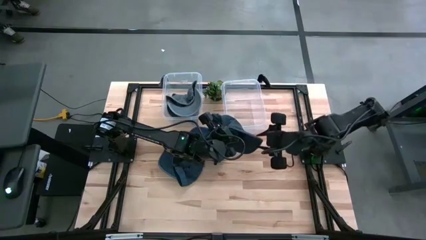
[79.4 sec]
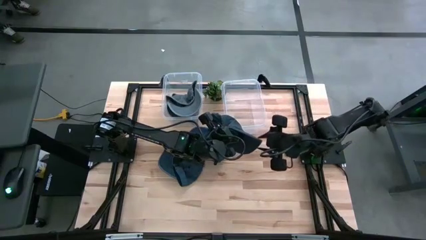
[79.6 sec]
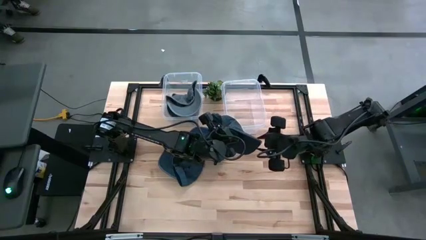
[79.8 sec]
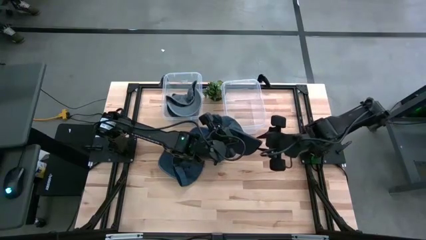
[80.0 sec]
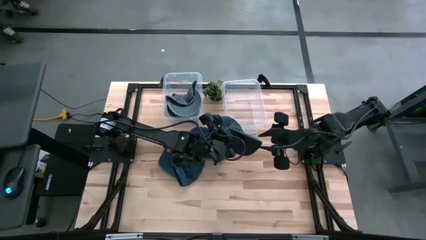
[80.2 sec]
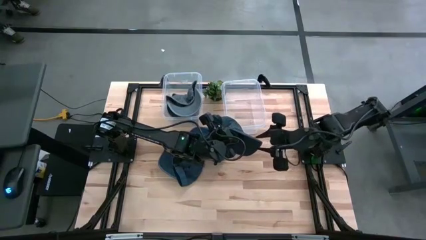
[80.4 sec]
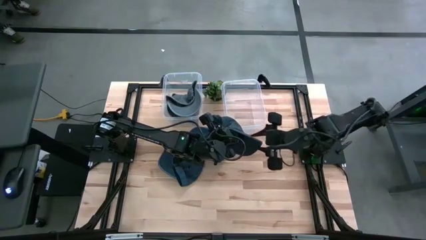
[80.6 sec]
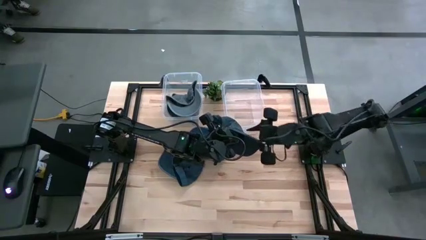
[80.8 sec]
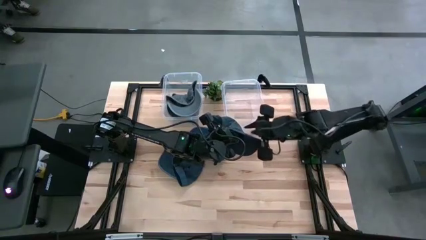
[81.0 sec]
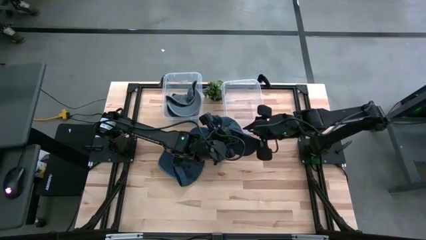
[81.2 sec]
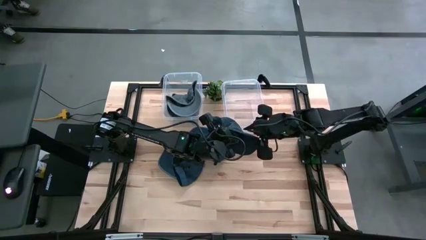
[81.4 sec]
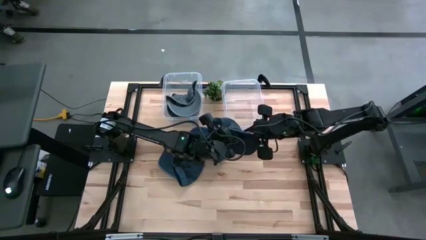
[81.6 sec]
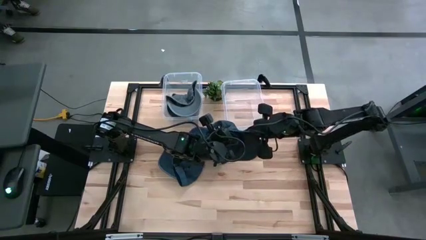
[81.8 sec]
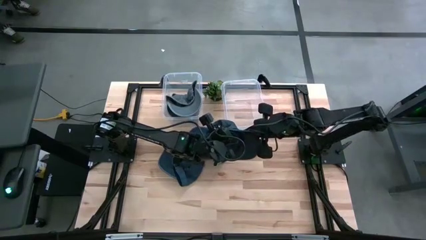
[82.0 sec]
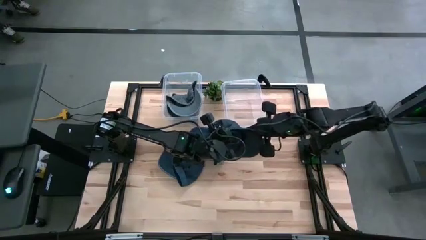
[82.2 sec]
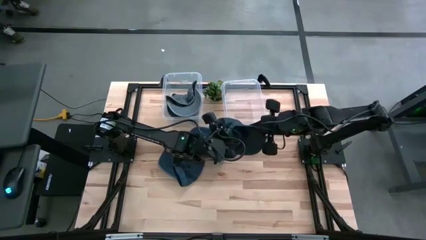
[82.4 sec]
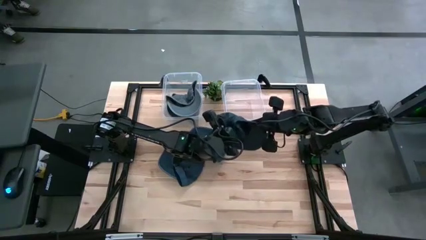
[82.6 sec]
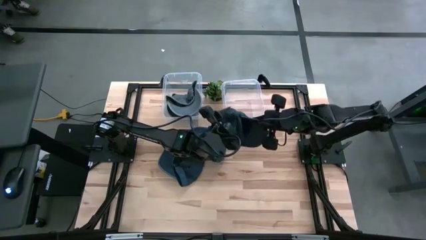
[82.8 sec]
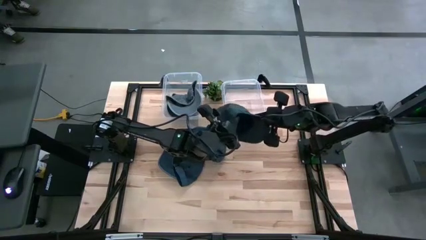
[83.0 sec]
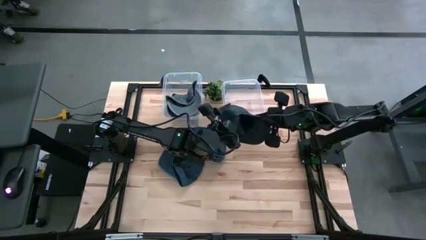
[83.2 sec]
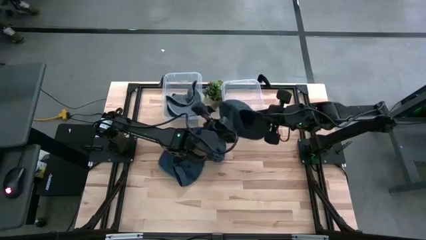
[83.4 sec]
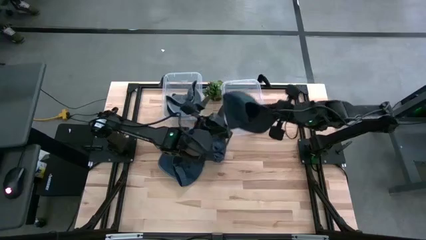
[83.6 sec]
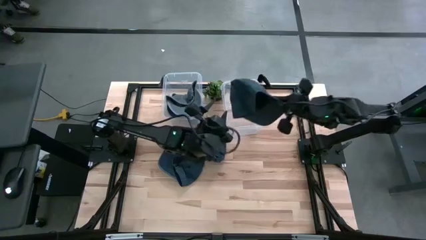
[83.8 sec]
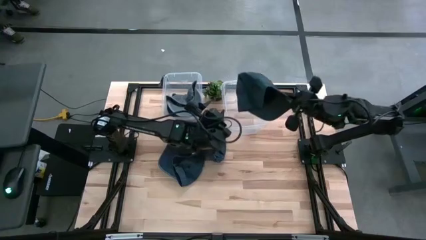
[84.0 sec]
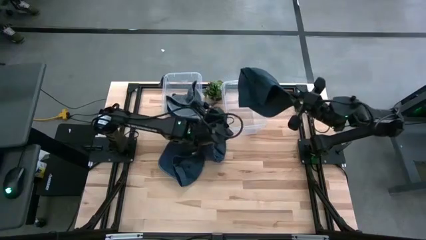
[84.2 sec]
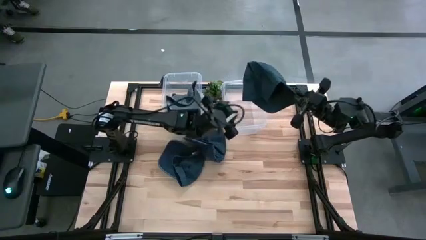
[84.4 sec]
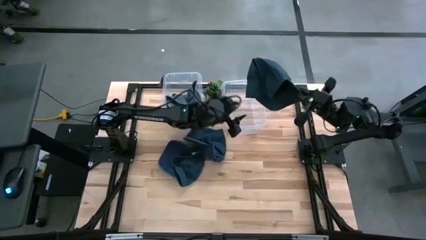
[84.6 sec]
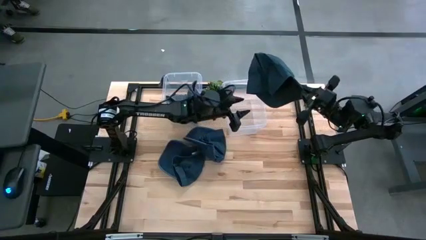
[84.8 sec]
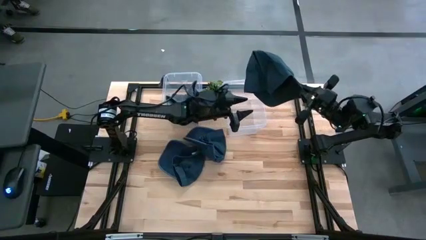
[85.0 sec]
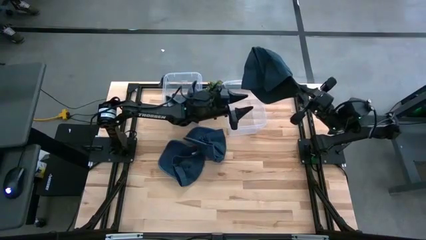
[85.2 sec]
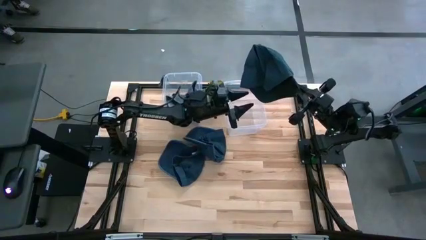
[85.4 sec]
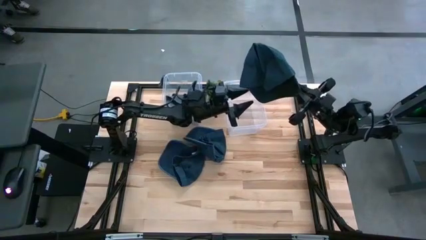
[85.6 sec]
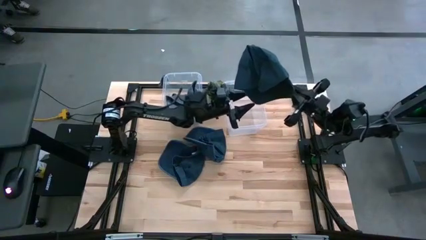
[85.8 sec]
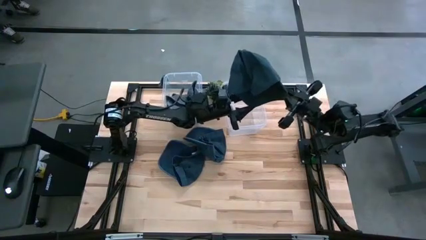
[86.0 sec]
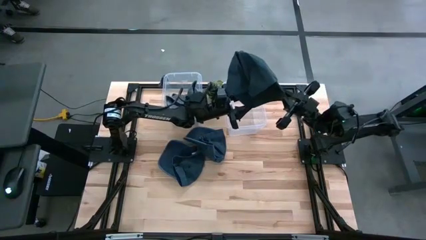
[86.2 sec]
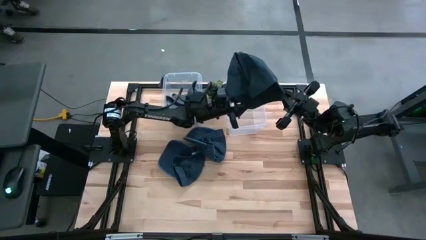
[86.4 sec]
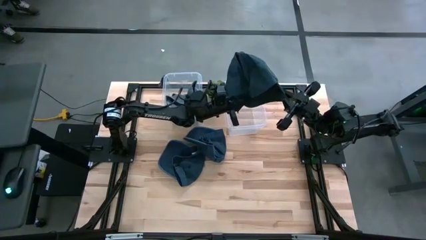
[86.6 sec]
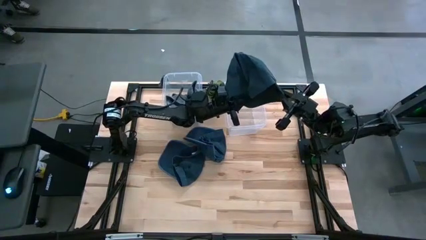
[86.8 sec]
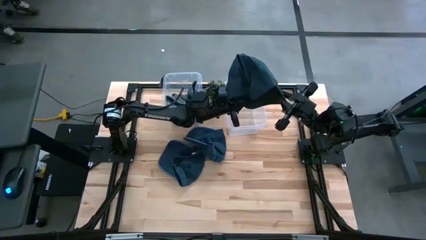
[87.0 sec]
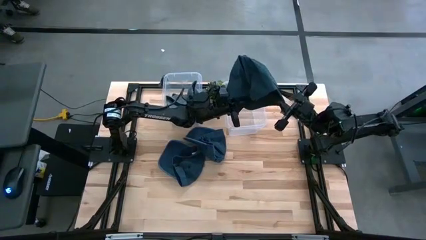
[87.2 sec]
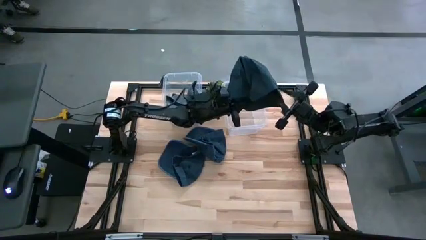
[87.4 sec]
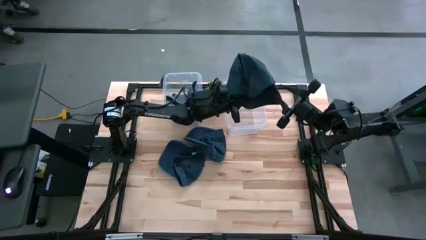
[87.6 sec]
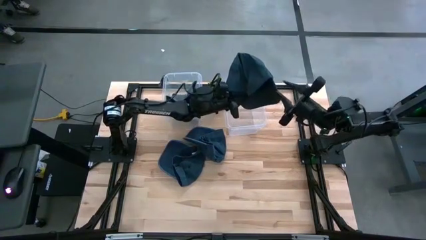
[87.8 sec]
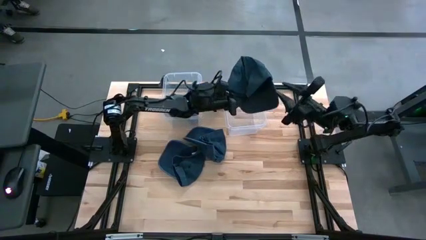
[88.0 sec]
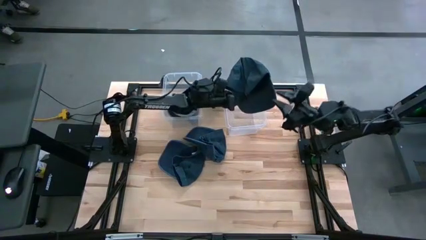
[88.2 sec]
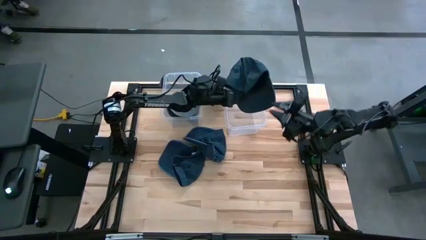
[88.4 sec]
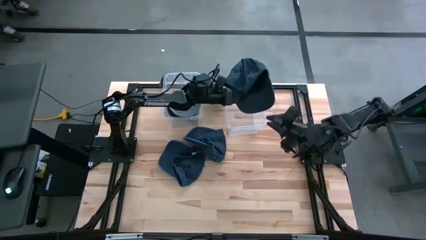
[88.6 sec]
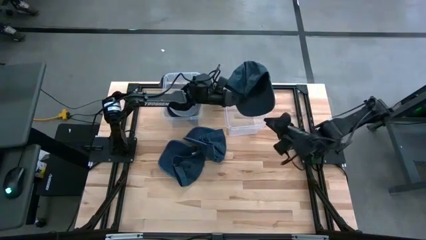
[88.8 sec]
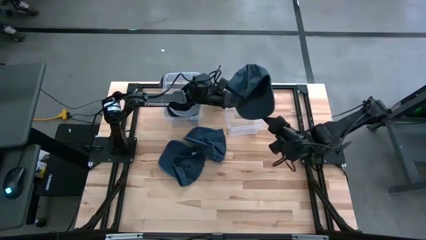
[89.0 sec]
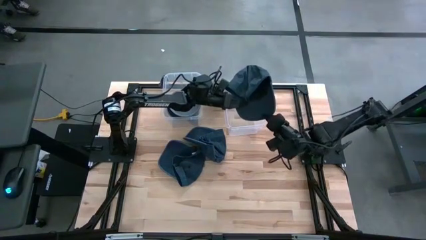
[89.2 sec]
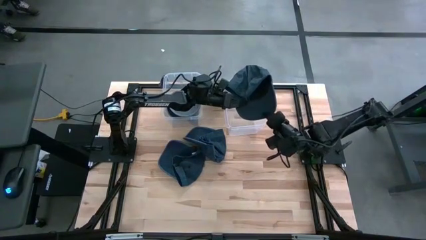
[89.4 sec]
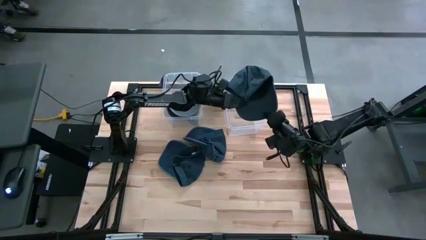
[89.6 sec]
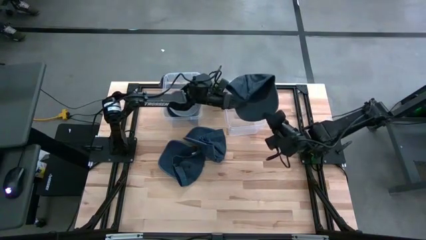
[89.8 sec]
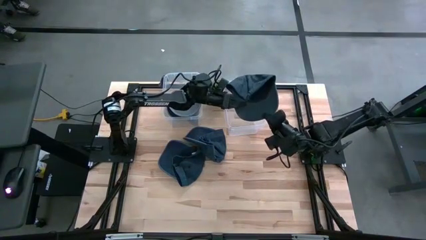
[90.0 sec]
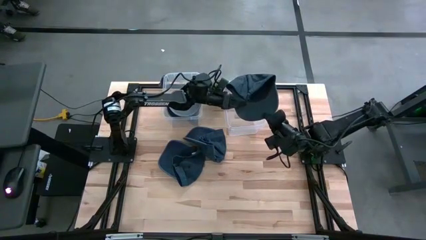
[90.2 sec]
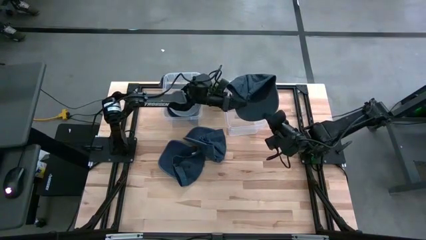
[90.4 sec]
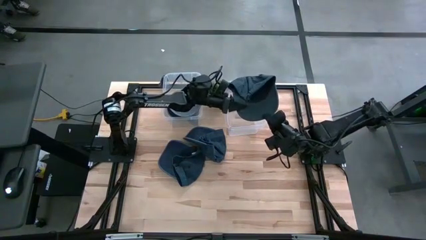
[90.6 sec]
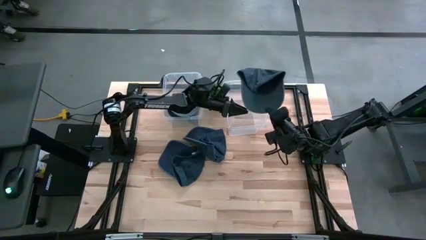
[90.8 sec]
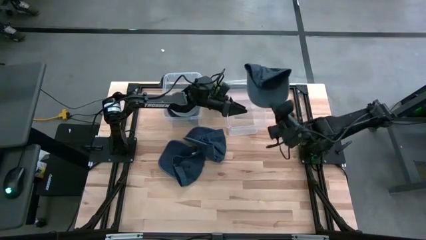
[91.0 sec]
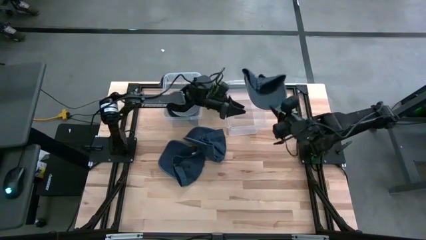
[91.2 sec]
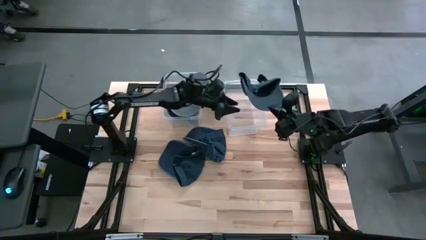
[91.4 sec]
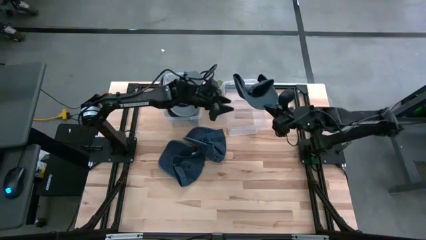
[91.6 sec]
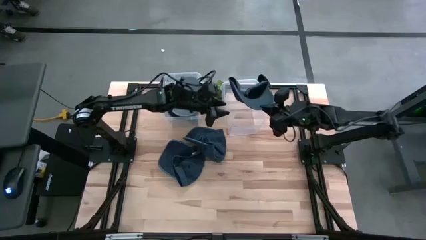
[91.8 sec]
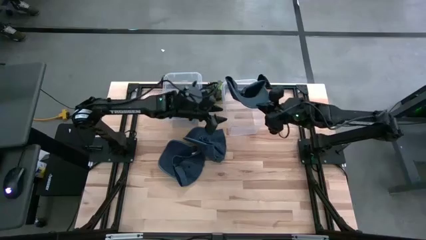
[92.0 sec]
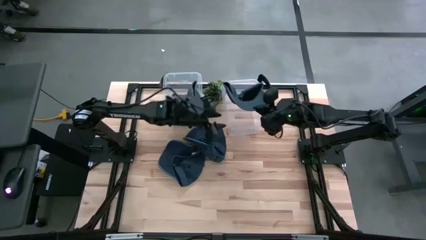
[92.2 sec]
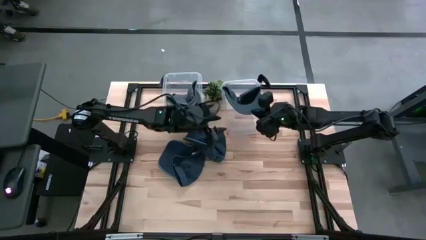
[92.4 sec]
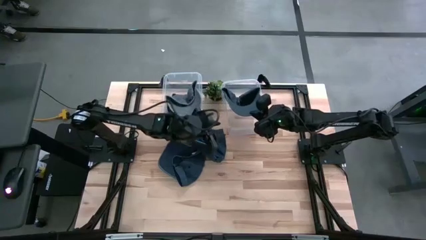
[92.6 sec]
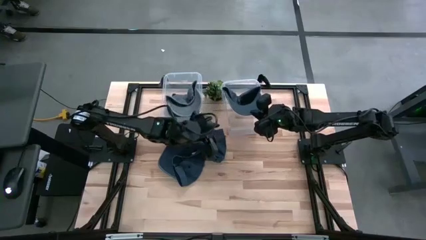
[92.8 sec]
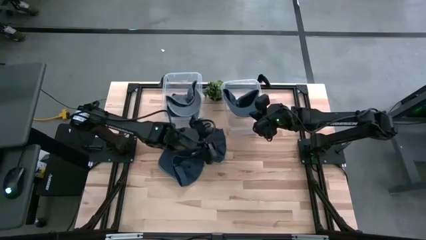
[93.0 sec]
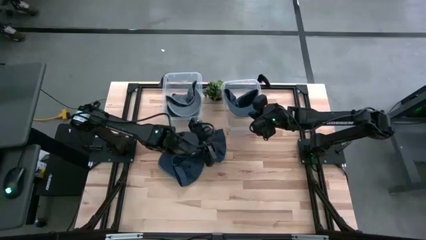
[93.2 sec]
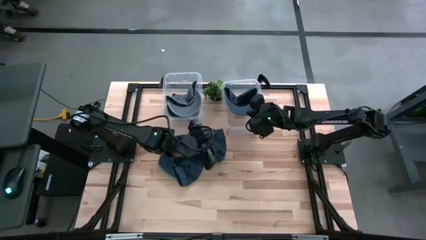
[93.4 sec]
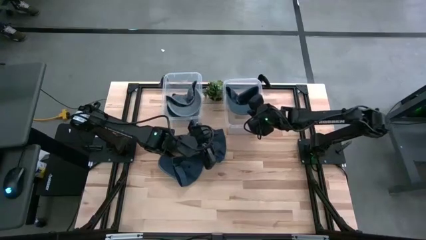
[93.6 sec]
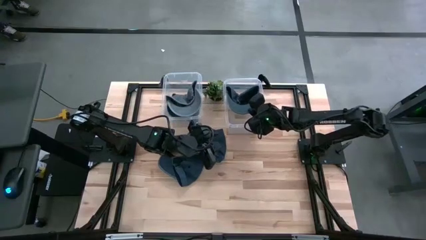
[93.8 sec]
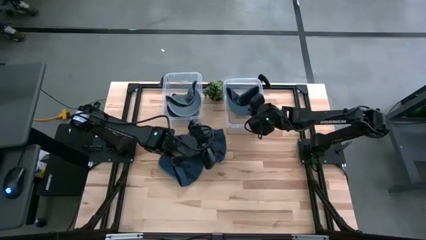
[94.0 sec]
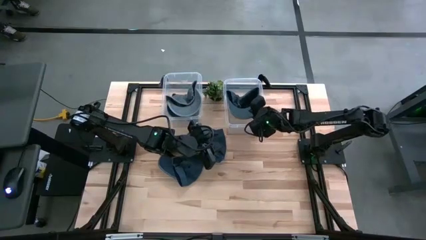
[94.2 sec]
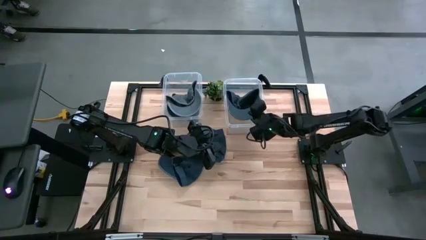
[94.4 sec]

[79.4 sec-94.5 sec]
Task: Pick & Place hat
Put the bottom blue cap into the right transparent bin

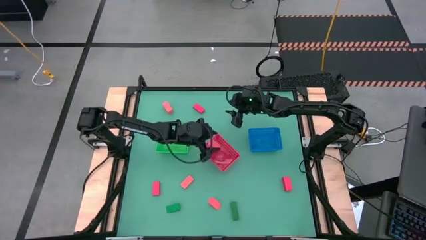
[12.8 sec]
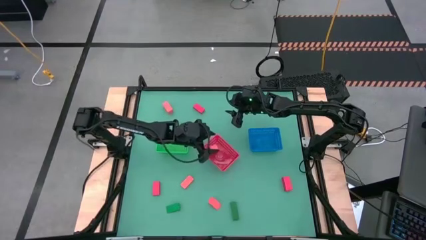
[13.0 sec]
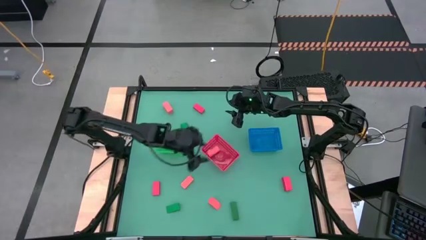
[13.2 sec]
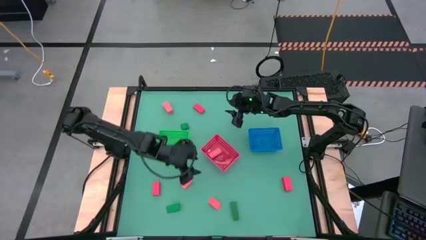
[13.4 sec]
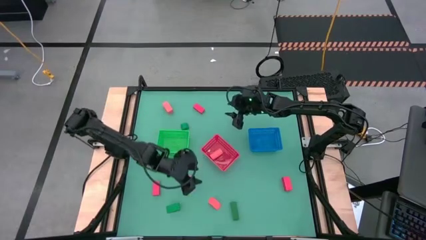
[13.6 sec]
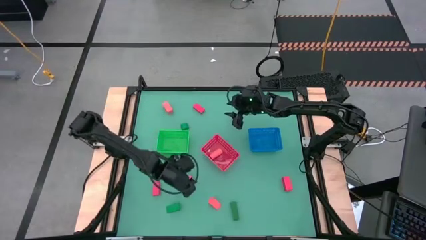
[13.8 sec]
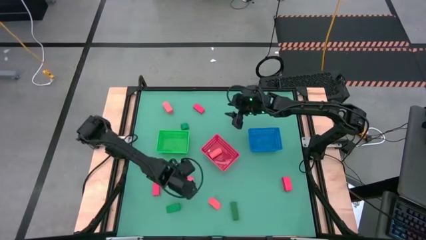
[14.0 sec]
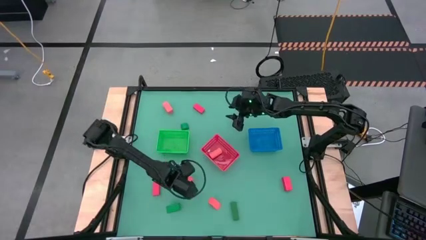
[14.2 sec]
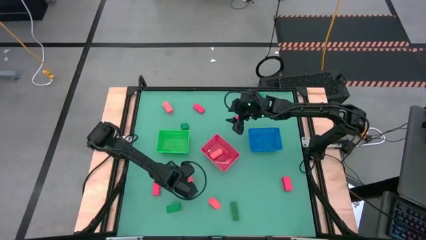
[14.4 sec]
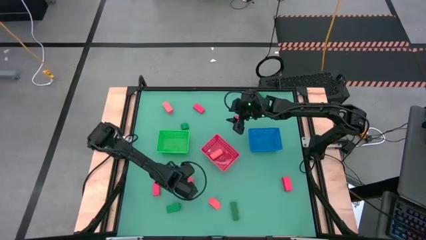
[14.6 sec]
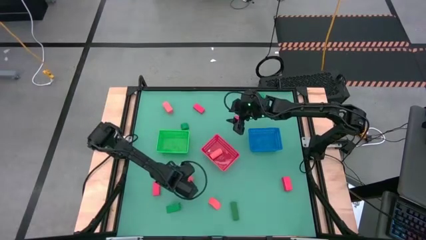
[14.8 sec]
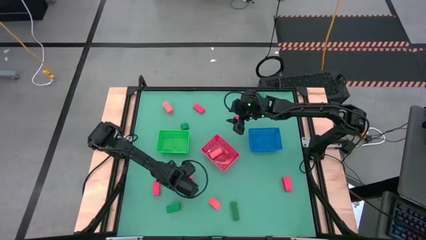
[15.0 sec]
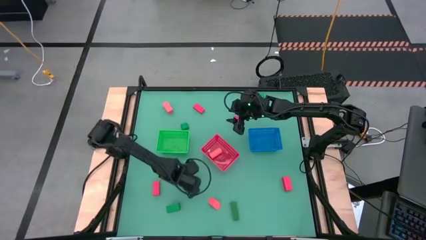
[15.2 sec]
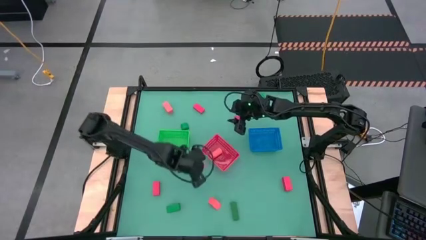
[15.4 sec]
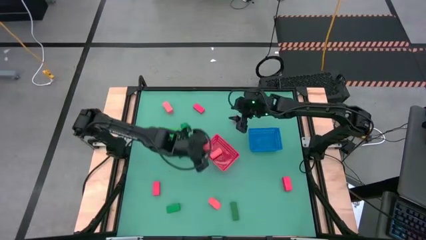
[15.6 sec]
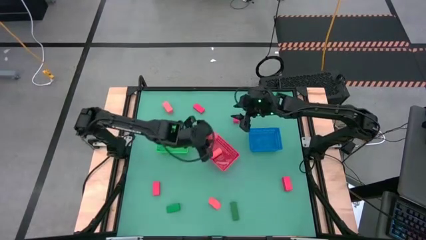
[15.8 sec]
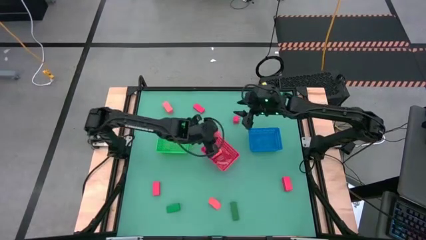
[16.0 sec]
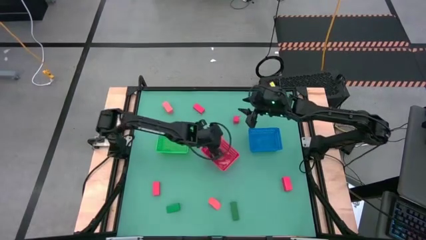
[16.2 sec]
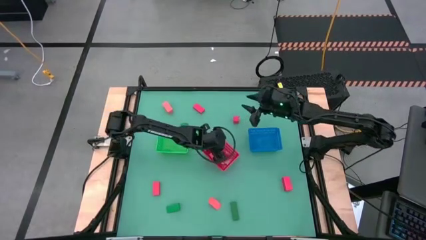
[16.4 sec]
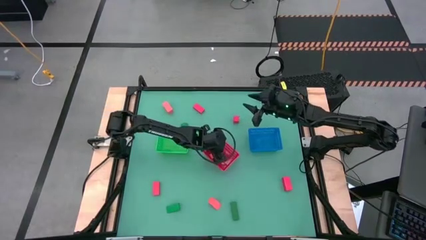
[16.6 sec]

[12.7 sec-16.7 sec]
Task: Sort & place blocks by color
Put the pink block into the red bin
